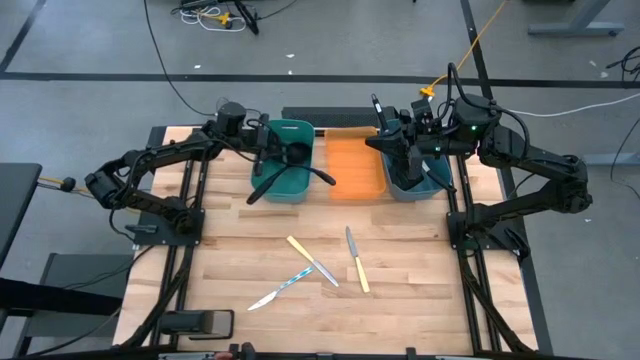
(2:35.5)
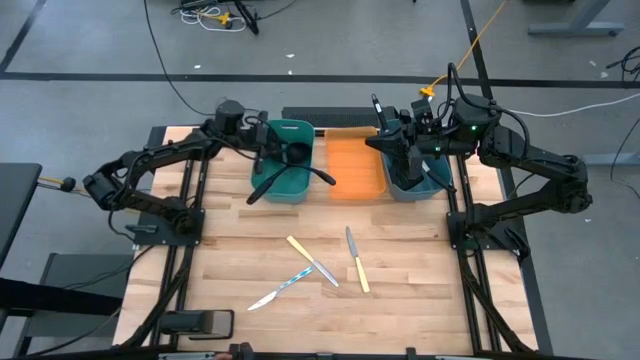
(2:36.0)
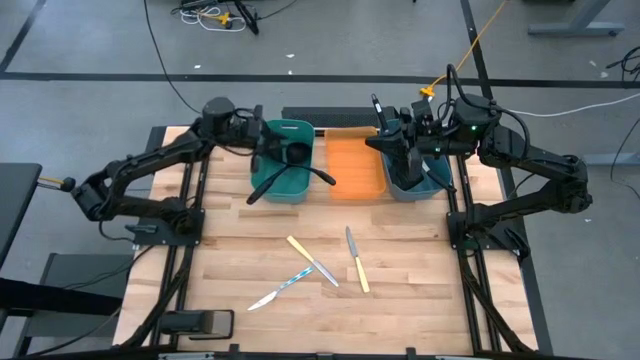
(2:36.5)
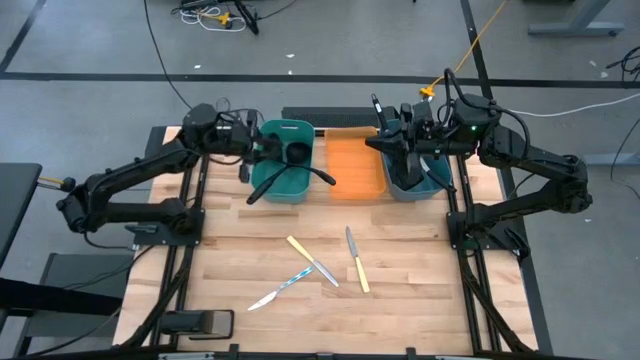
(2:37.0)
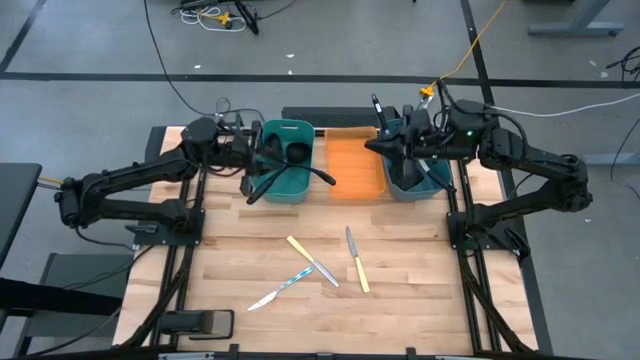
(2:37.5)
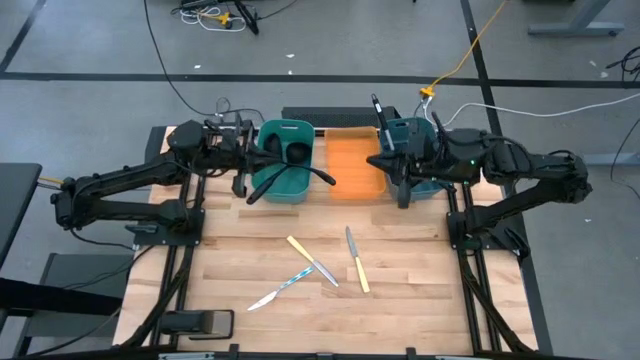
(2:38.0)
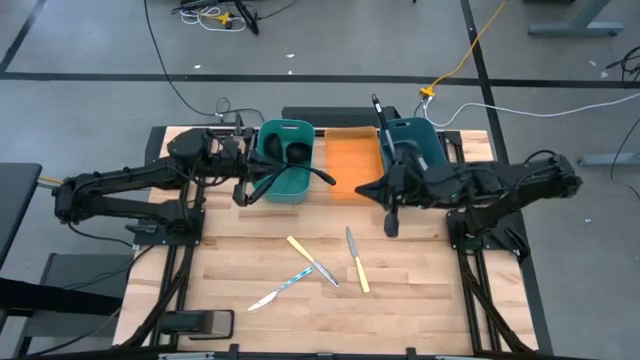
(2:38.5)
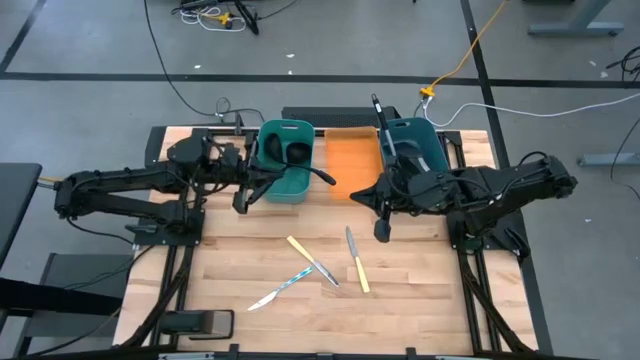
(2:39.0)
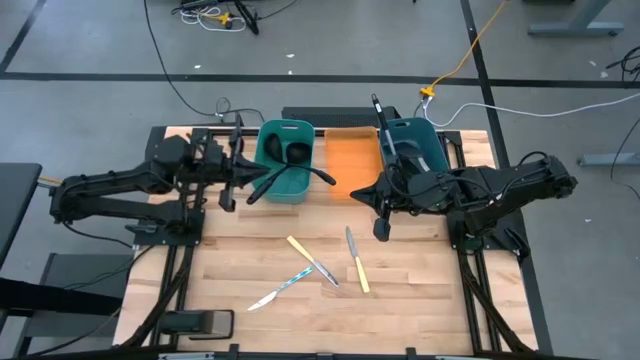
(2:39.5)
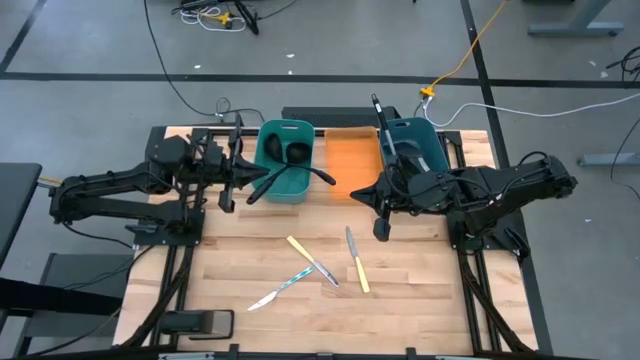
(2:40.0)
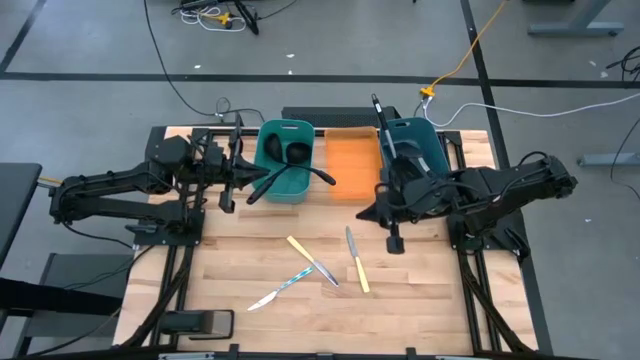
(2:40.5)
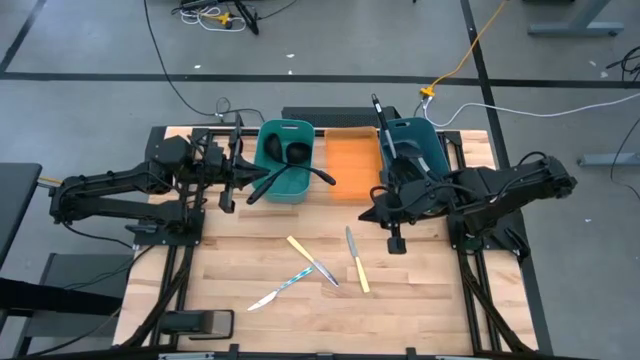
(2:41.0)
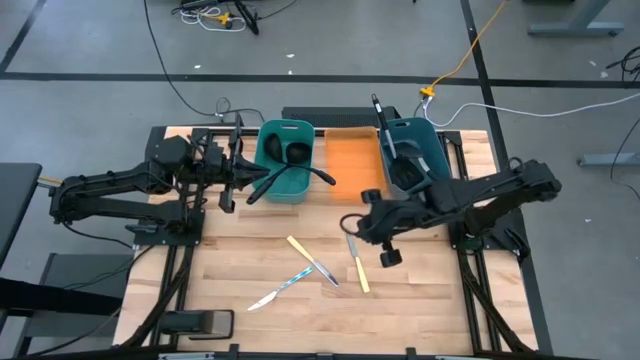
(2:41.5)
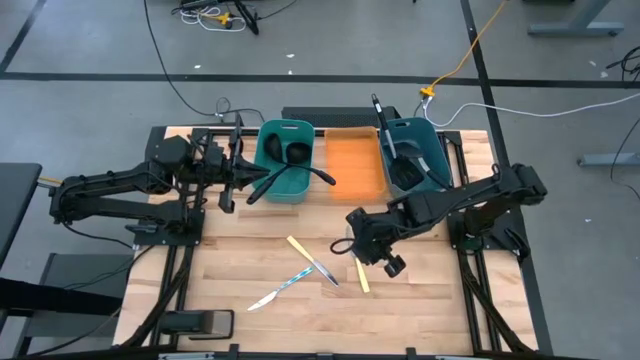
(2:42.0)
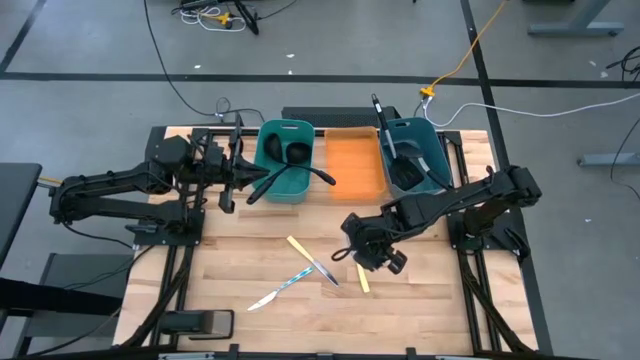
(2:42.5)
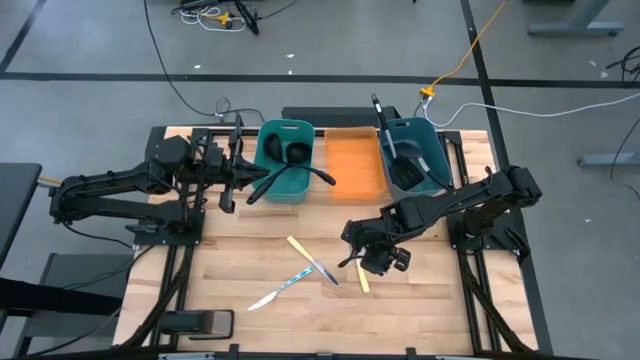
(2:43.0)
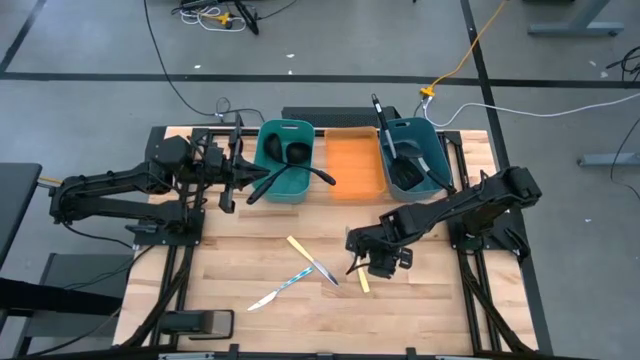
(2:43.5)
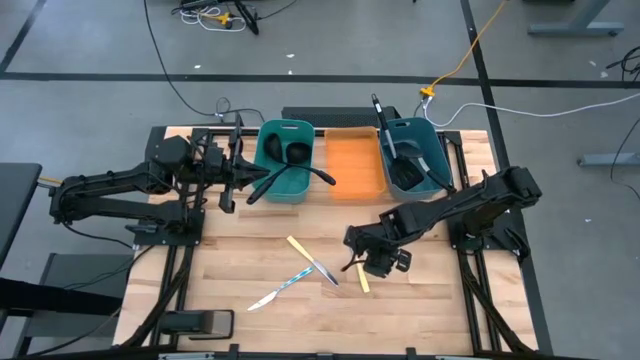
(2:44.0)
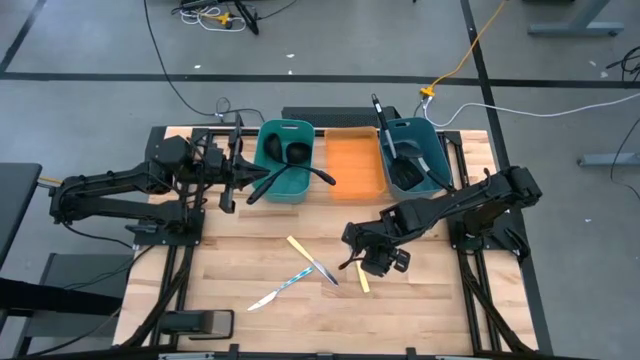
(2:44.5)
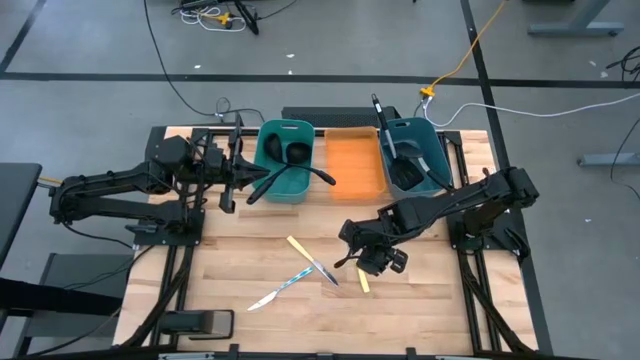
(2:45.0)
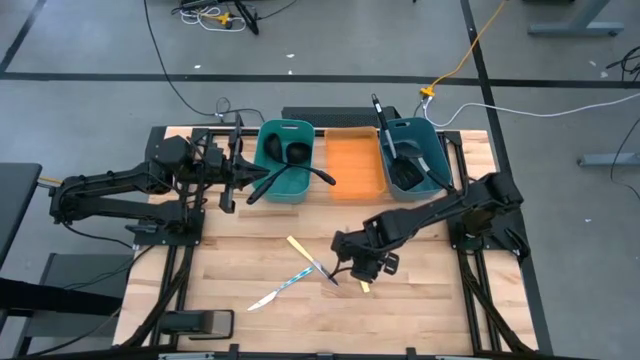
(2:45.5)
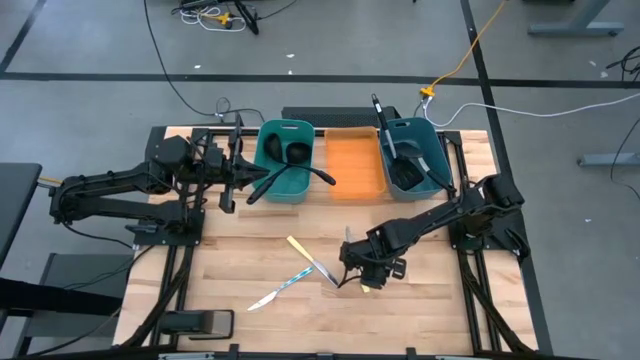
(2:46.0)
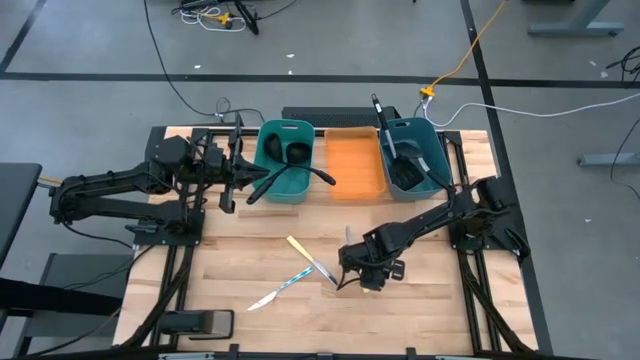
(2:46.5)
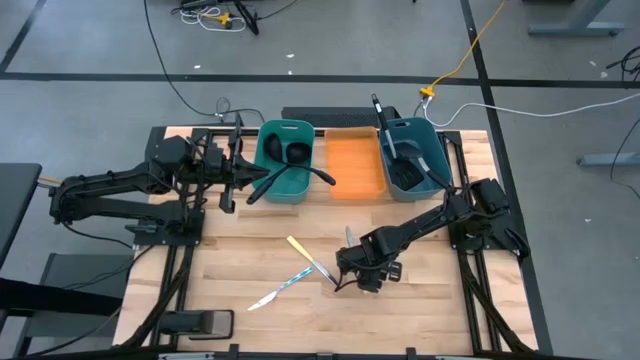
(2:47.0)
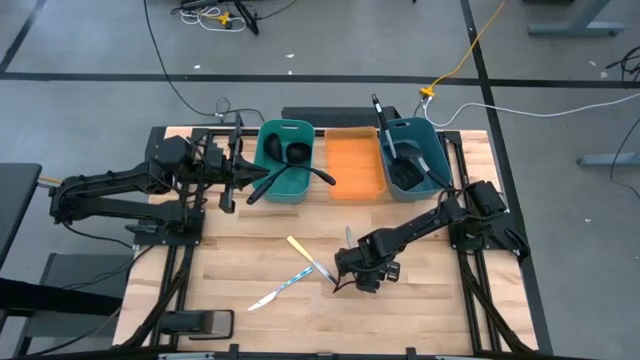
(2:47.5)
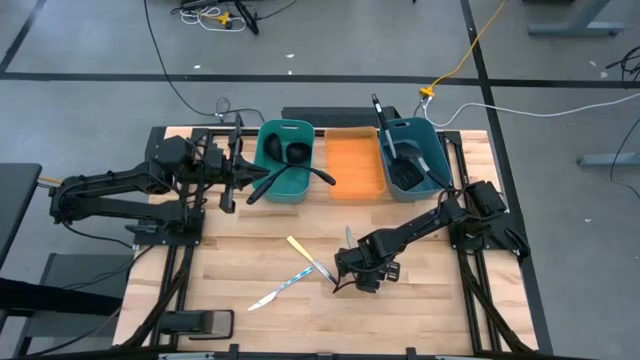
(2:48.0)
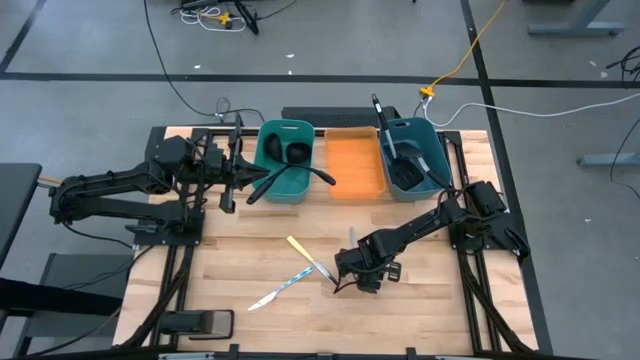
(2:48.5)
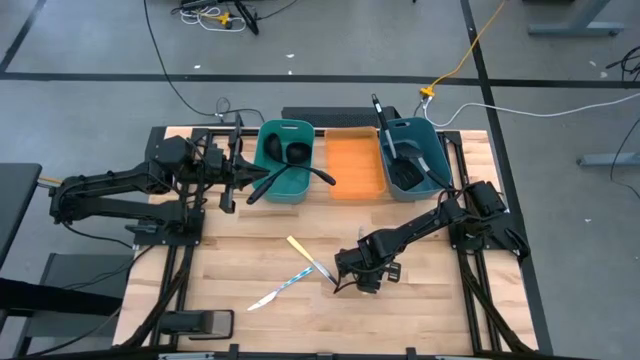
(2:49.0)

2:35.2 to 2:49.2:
Task: Pick & Place Kitchen Items
Put the right yellow table knife into the orange bin

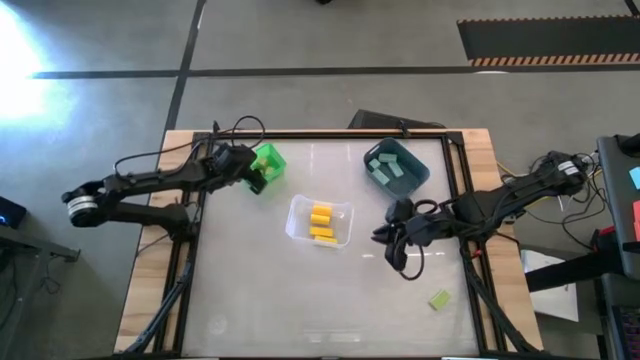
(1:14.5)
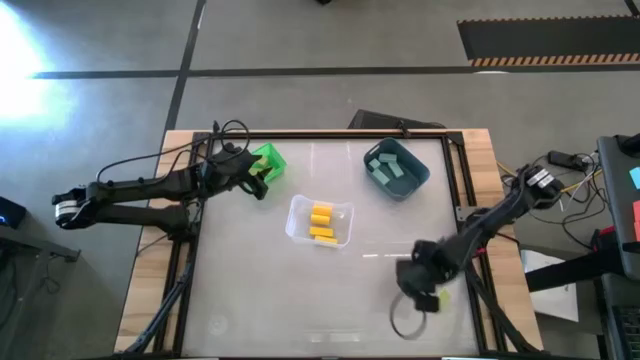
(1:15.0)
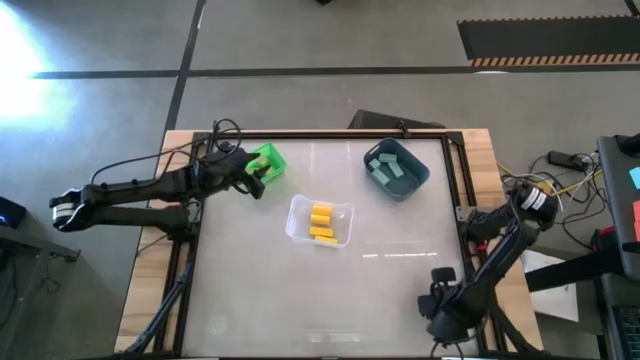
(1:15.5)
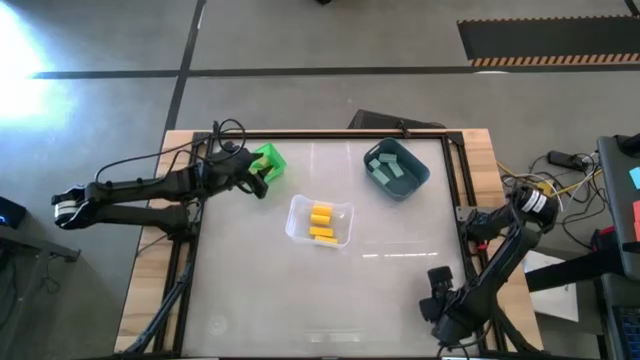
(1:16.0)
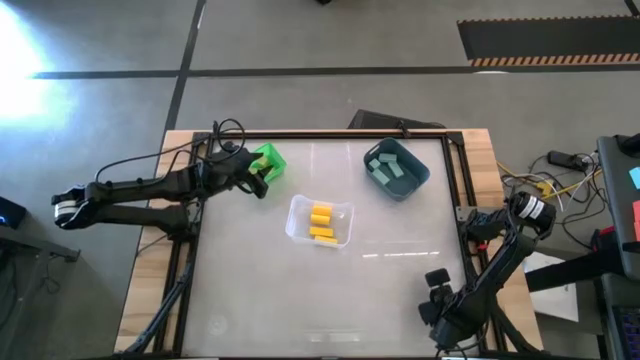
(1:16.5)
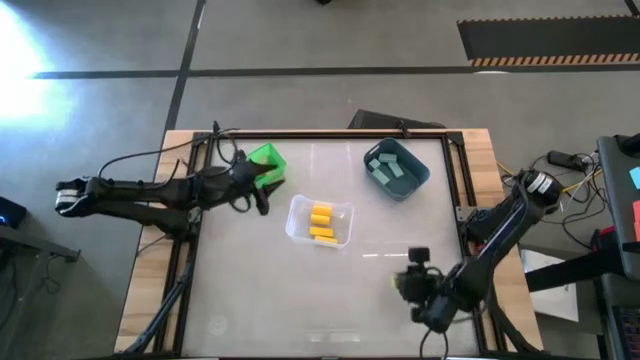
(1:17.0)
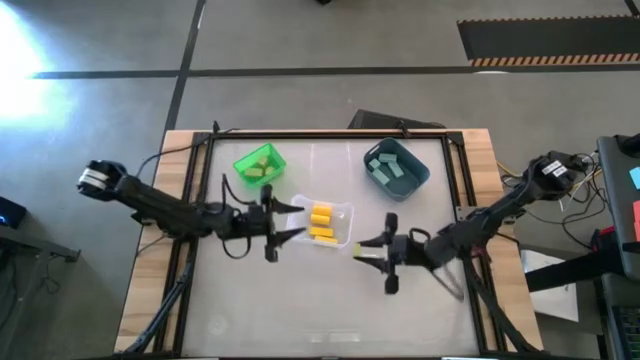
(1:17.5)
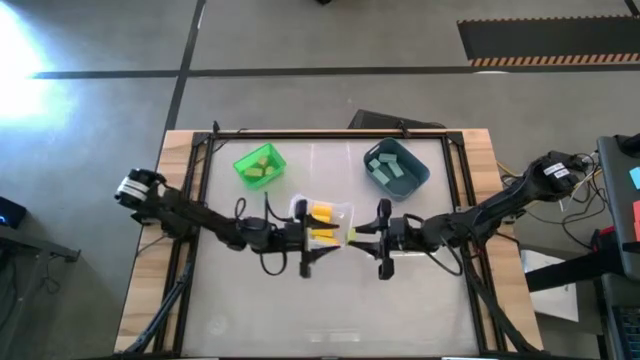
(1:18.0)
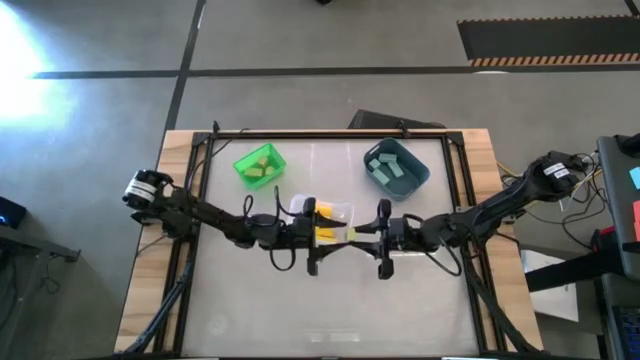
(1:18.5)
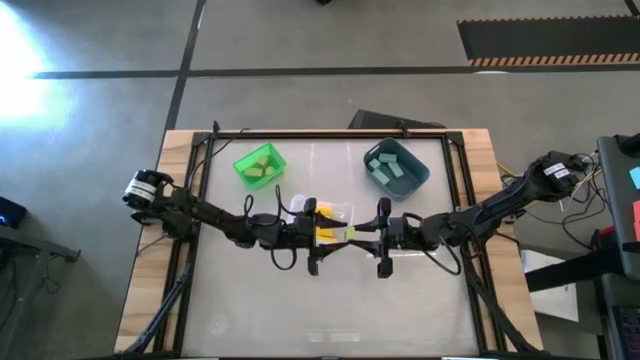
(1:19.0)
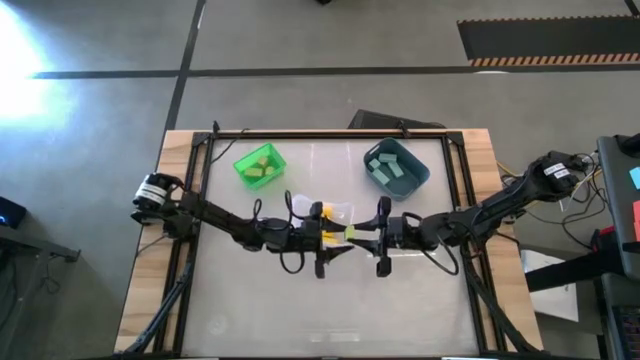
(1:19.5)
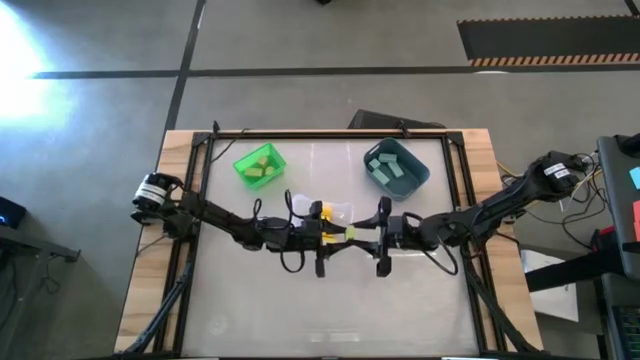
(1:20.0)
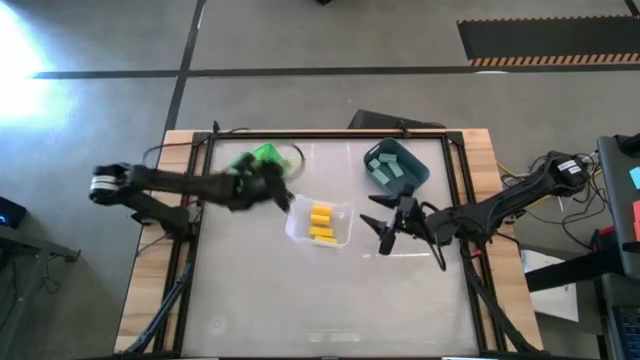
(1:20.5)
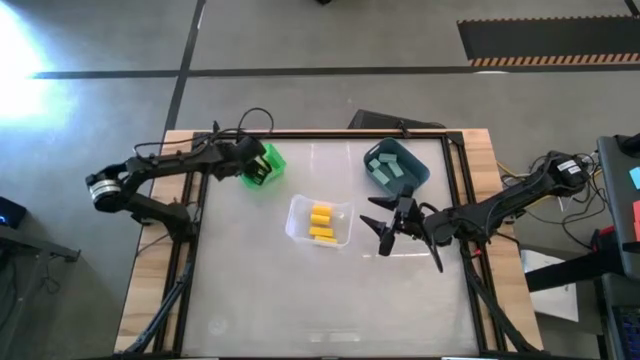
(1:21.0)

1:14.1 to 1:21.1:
Task: Sort & place blocks by color
Put the green block into the green bin
